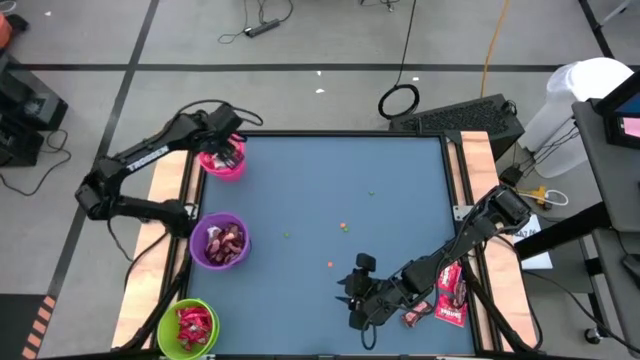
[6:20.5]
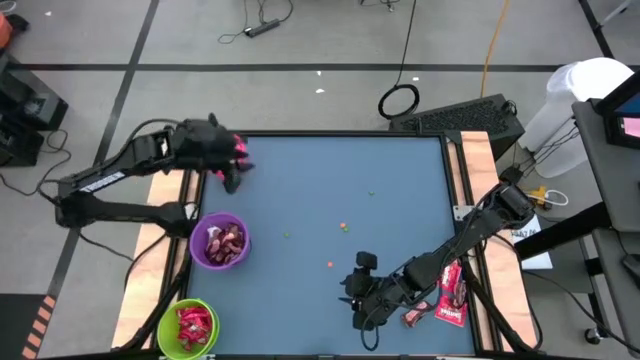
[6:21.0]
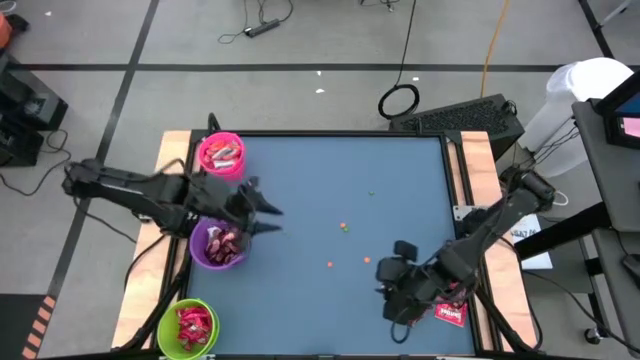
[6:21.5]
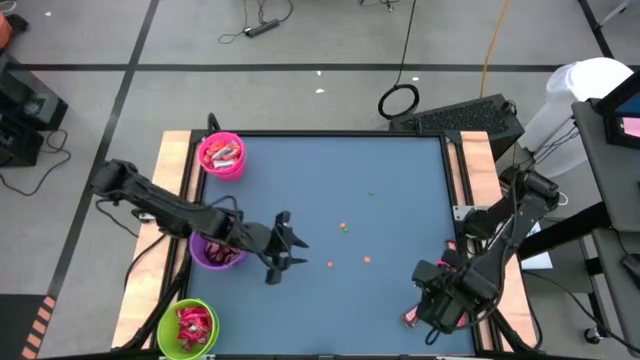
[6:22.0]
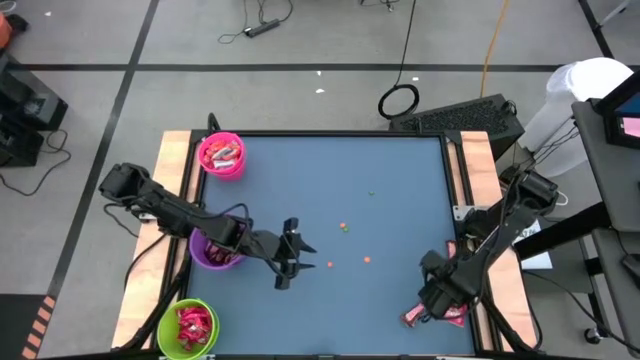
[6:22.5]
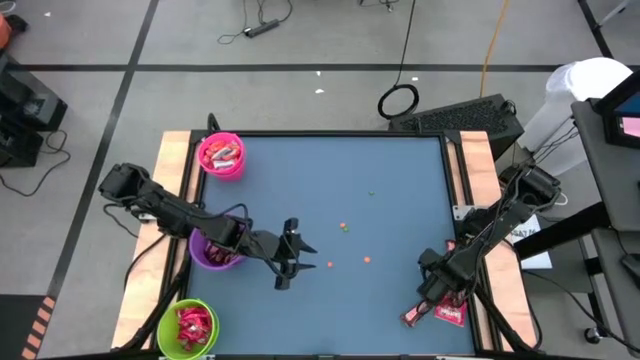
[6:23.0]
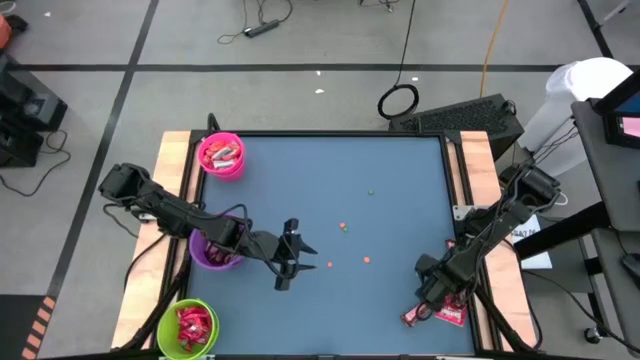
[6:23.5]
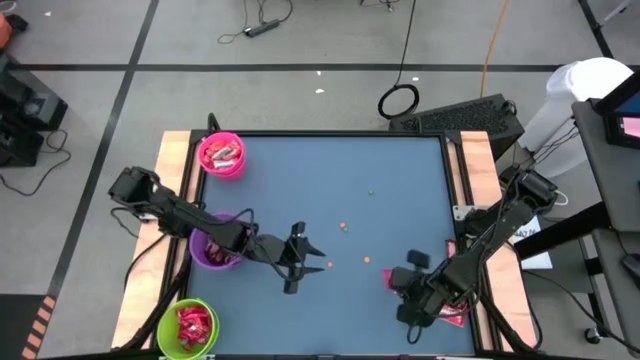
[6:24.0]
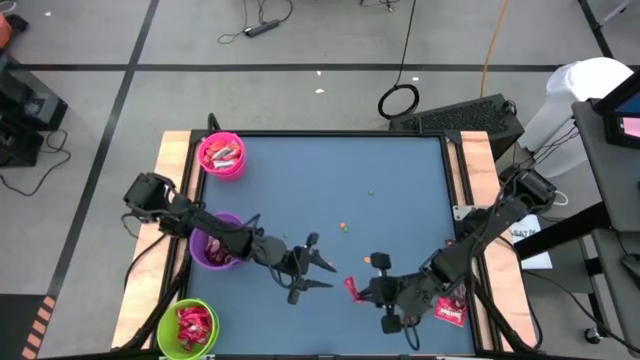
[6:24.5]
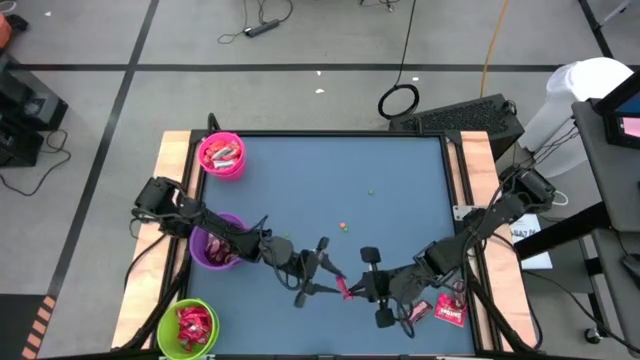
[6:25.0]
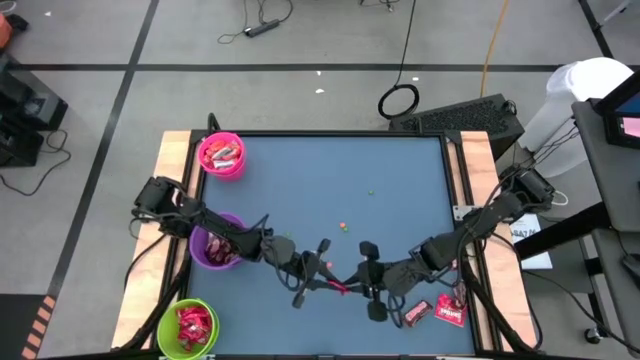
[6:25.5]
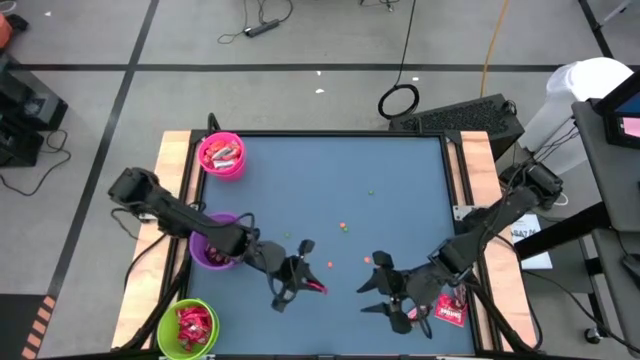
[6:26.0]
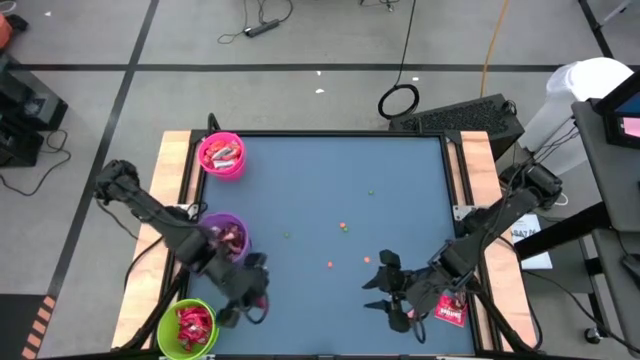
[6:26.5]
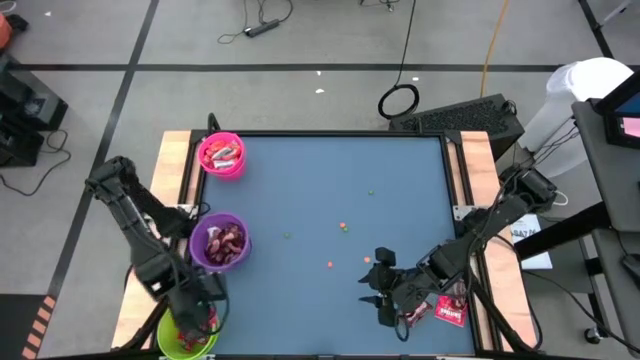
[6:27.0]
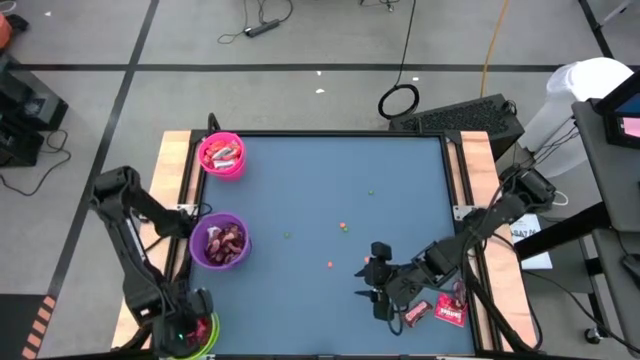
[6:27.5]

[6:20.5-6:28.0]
Task: Organize candy in baskets
Put the red candy into the green bucket

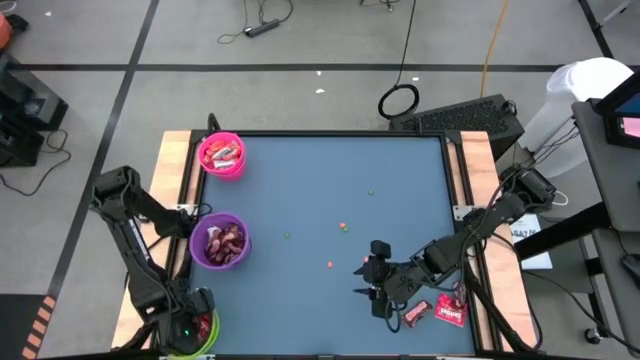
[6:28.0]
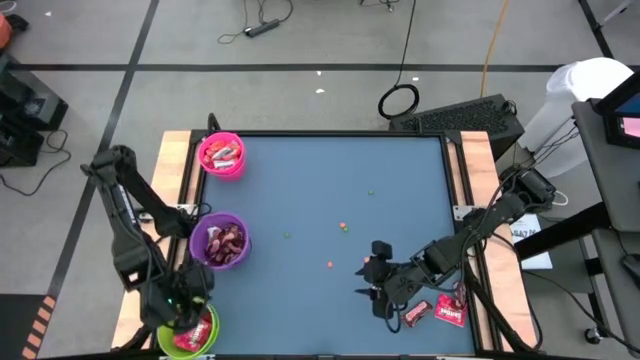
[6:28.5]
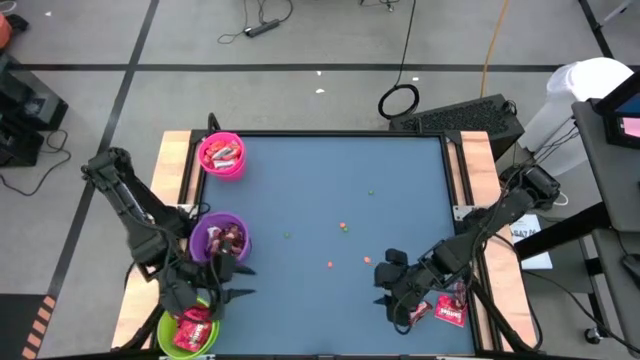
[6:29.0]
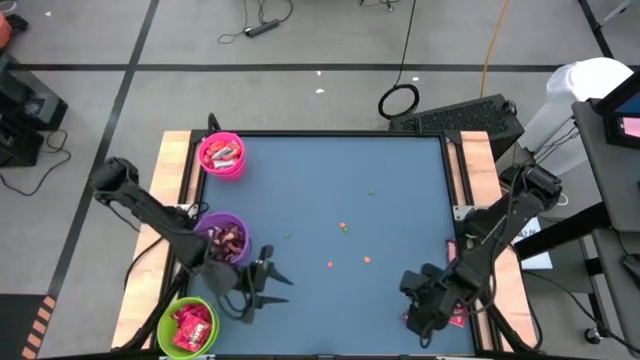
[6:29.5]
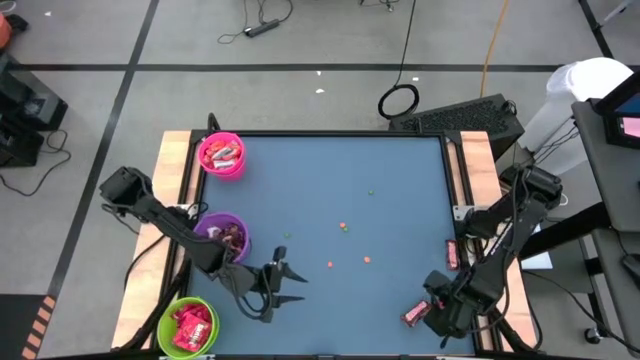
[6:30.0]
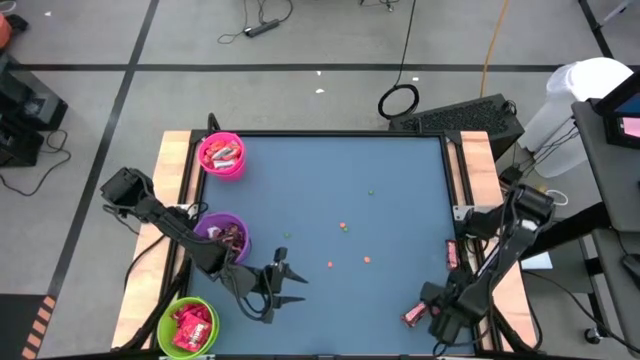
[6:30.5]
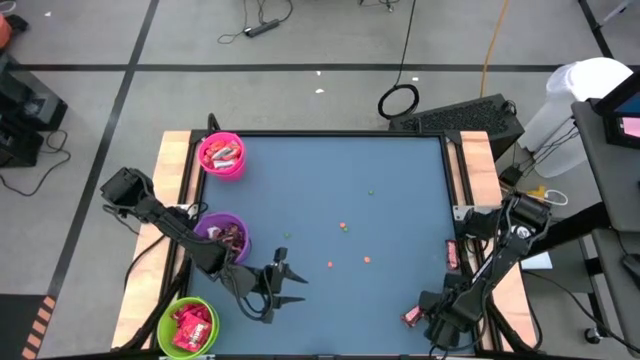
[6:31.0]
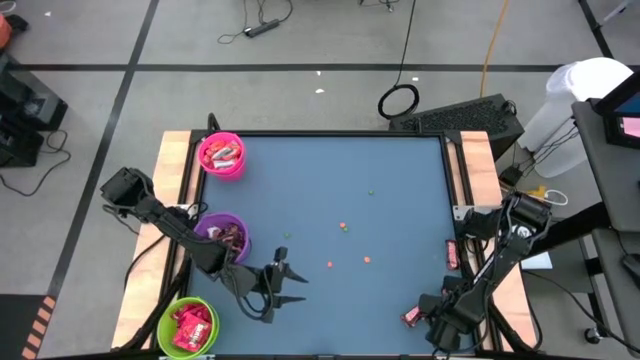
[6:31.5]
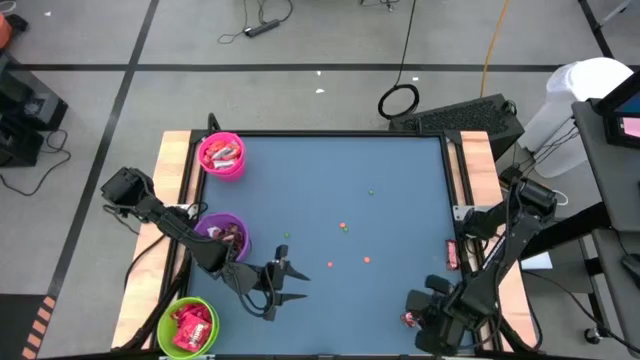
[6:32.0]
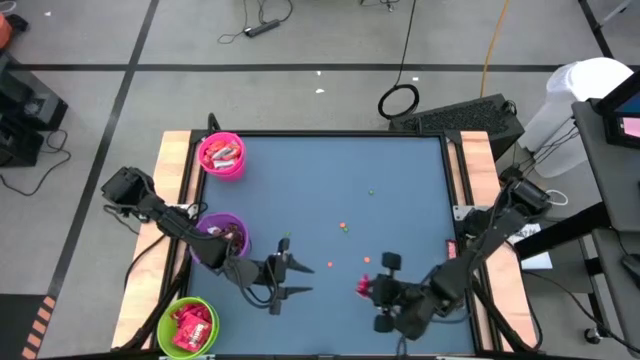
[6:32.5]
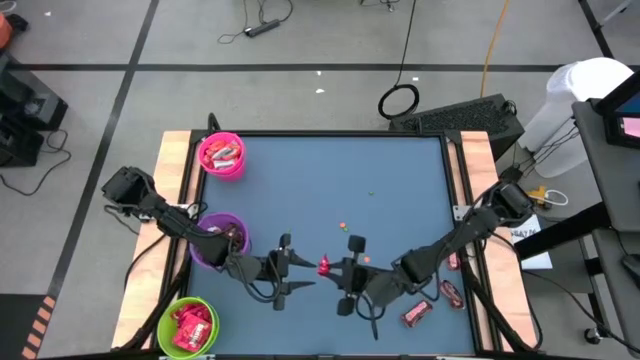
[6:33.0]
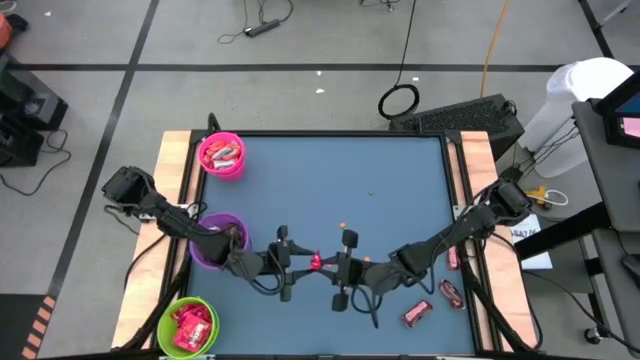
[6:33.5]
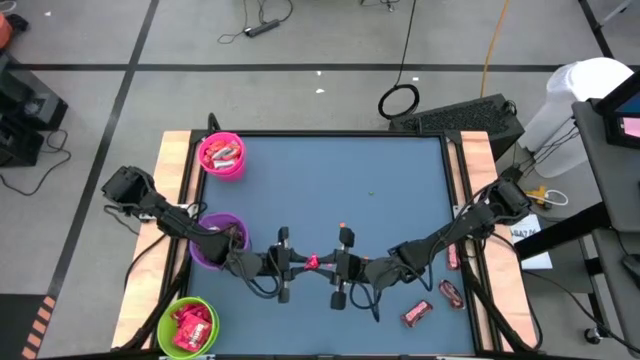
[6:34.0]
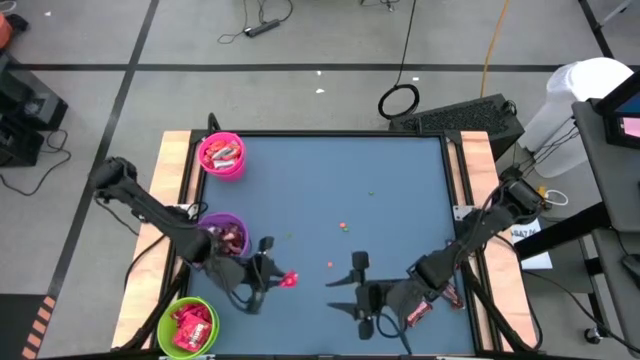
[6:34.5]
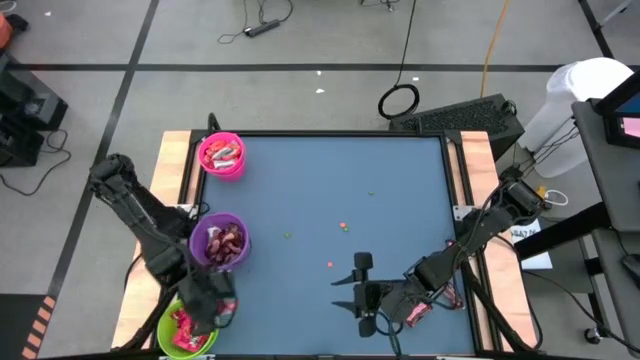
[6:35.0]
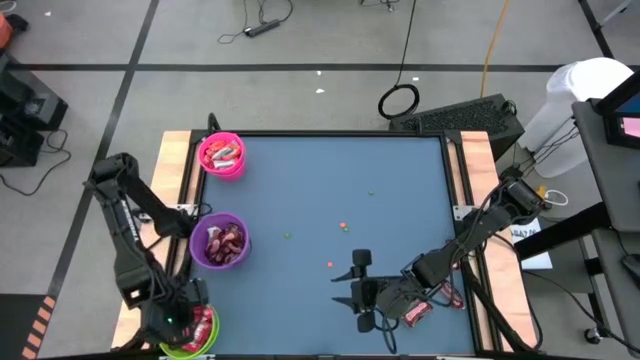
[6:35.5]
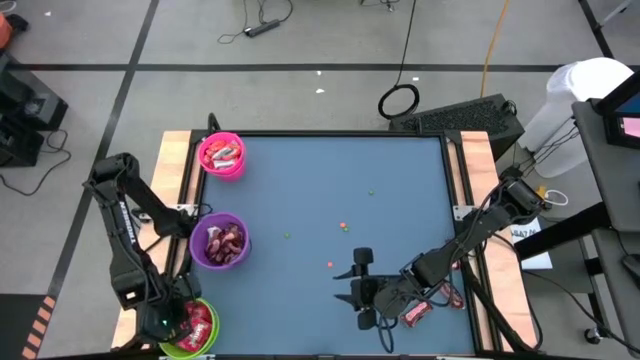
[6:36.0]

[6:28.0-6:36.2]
Put the red candy into the green bucket

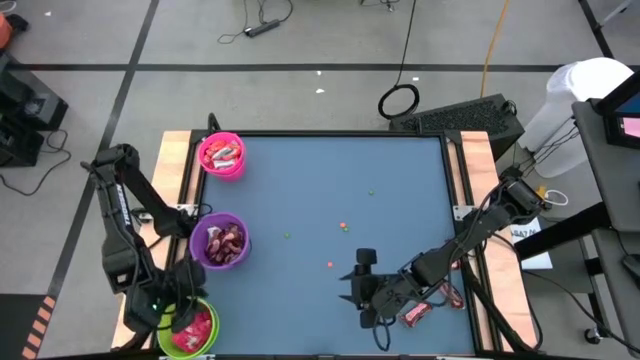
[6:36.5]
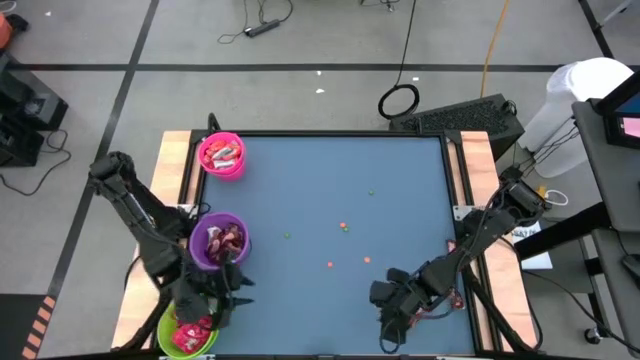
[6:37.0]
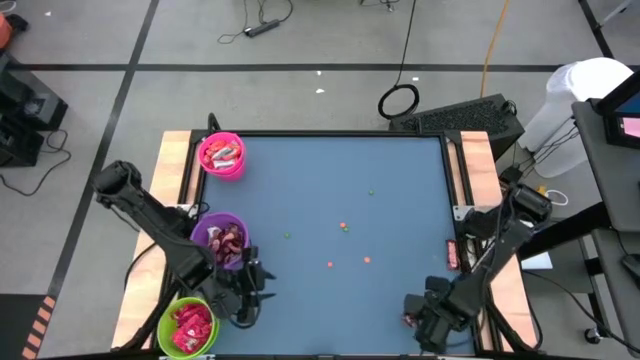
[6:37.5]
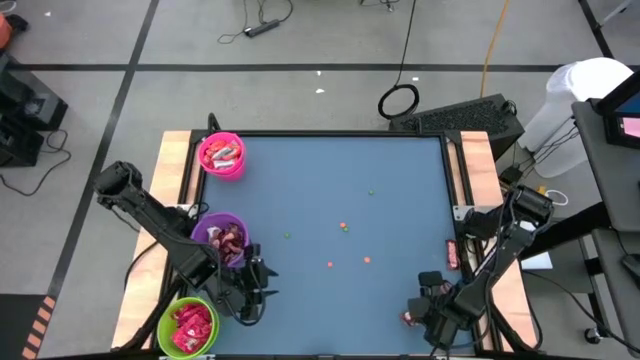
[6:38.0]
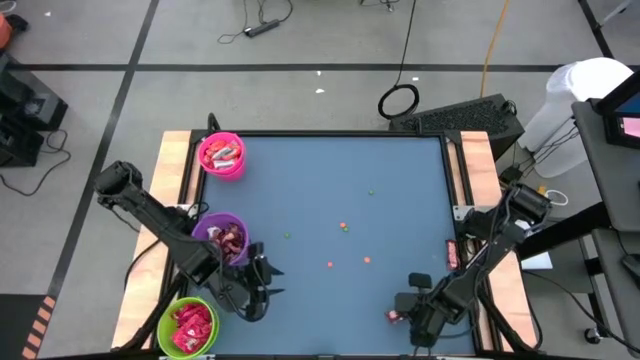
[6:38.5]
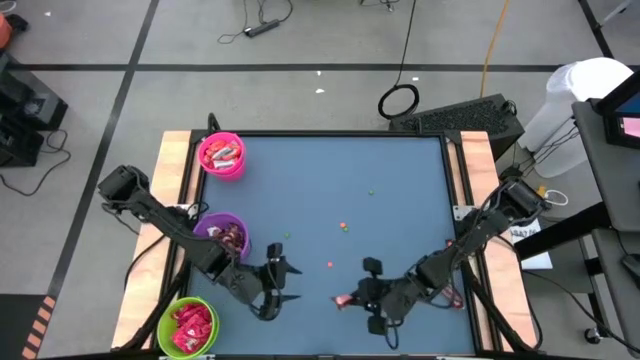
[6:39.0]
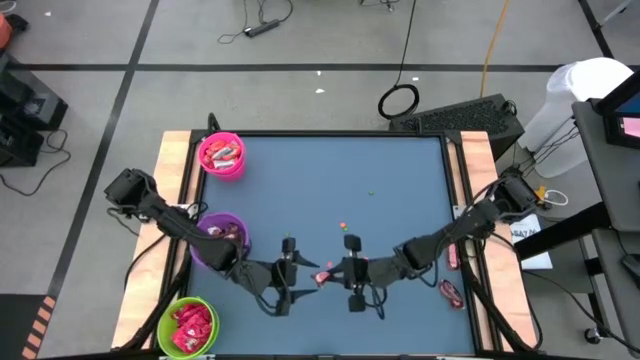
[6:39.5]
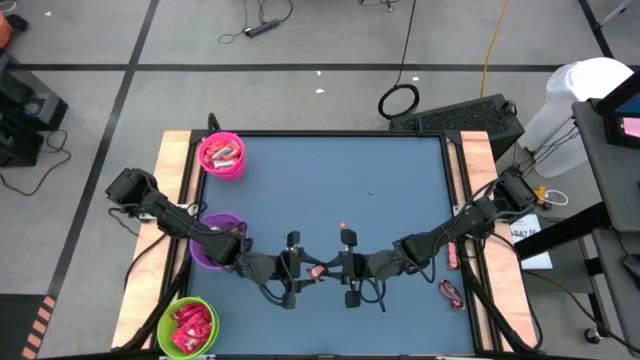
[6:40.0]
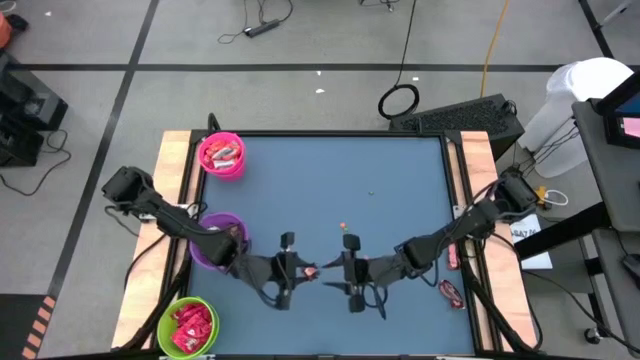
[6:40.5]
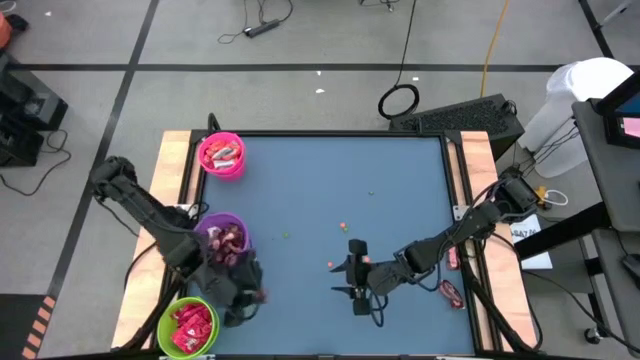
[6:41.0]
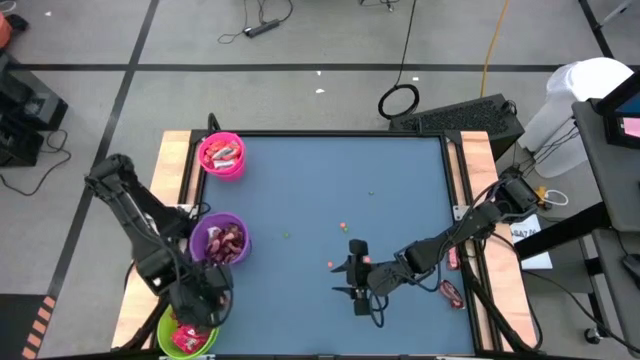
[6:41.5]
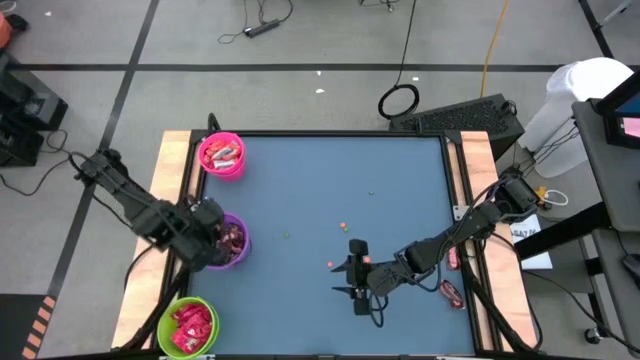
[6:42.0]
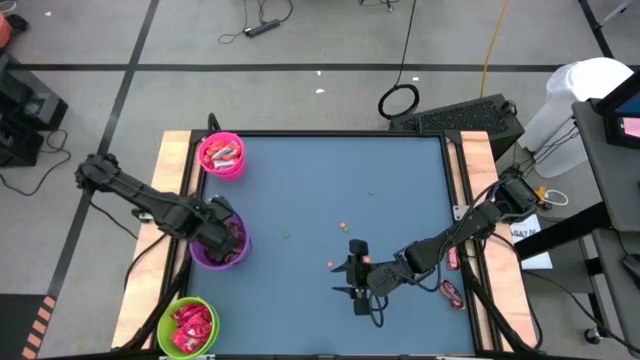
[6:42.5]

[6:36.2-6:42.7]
Put the brown chocolate into the violet bucket
